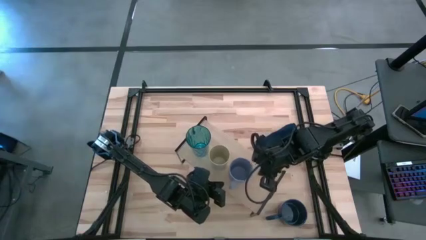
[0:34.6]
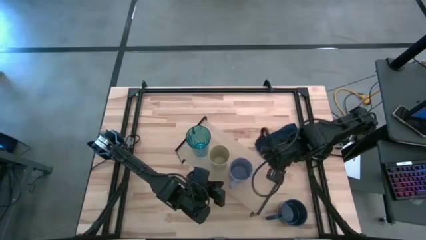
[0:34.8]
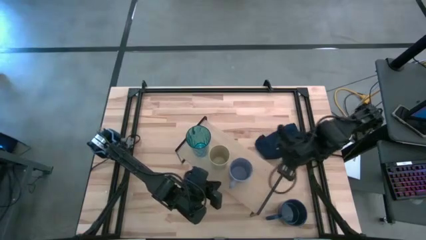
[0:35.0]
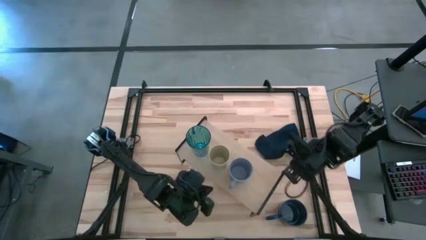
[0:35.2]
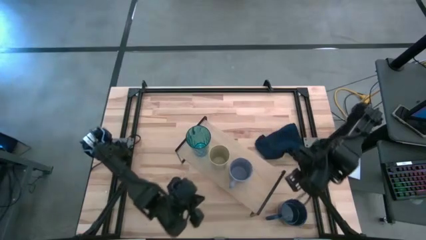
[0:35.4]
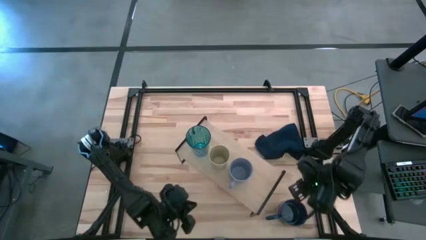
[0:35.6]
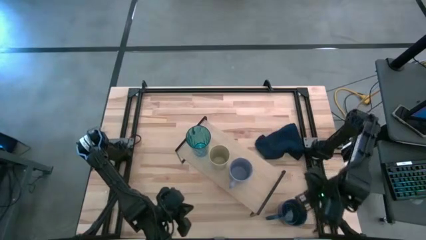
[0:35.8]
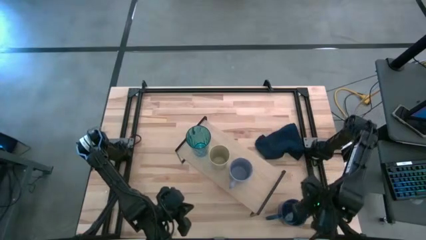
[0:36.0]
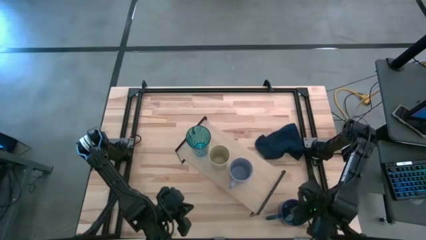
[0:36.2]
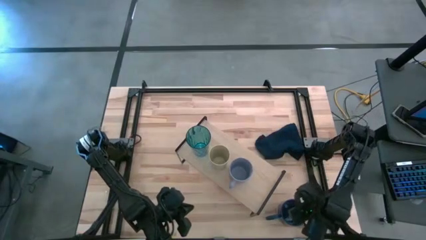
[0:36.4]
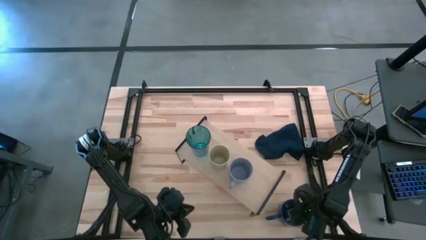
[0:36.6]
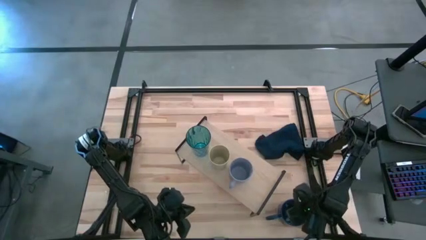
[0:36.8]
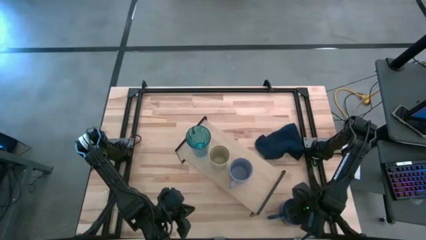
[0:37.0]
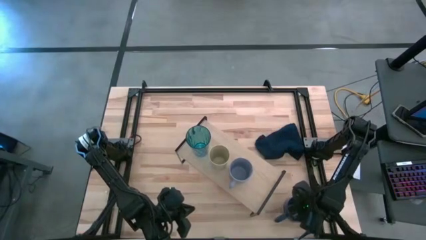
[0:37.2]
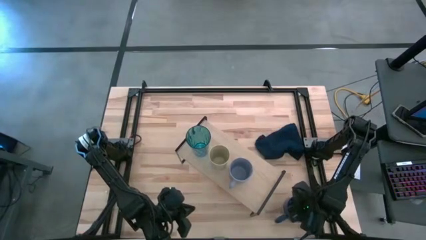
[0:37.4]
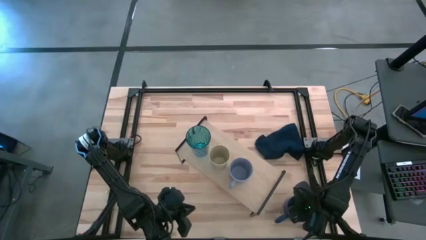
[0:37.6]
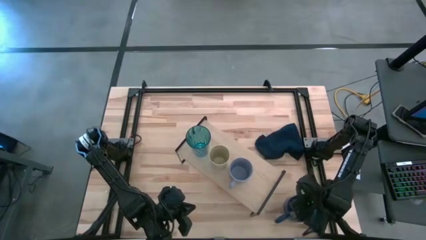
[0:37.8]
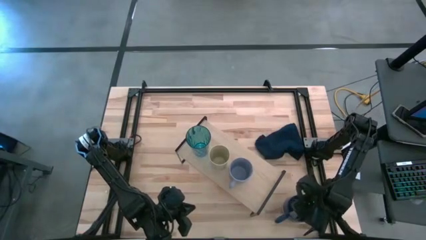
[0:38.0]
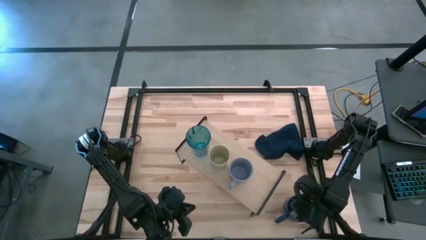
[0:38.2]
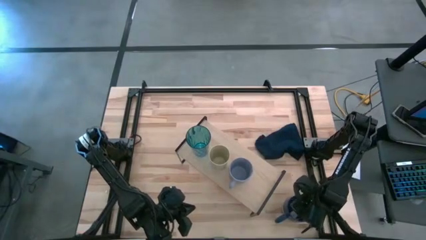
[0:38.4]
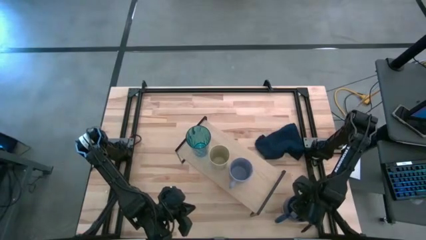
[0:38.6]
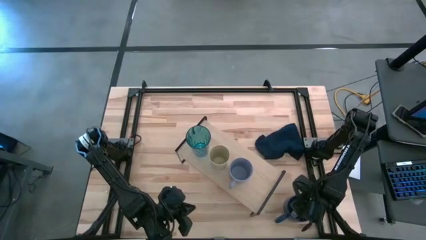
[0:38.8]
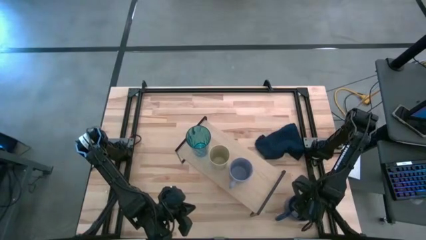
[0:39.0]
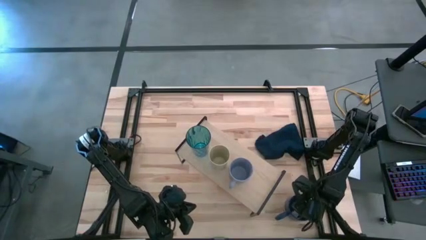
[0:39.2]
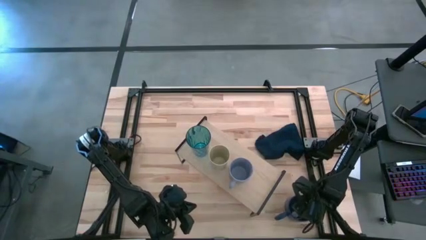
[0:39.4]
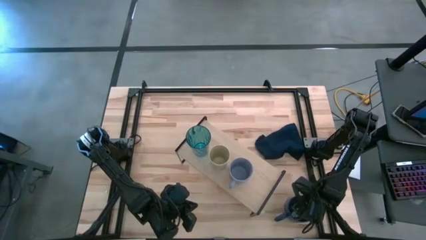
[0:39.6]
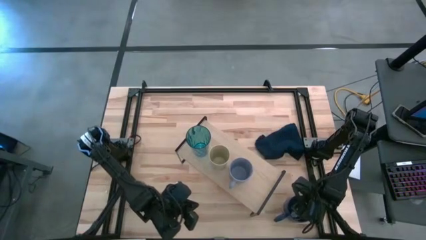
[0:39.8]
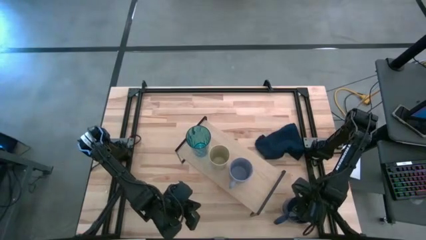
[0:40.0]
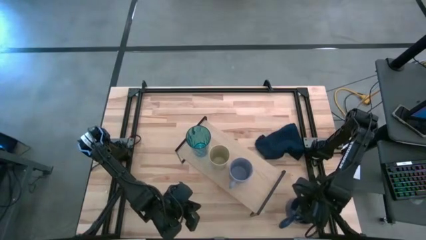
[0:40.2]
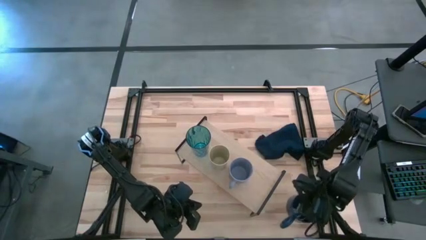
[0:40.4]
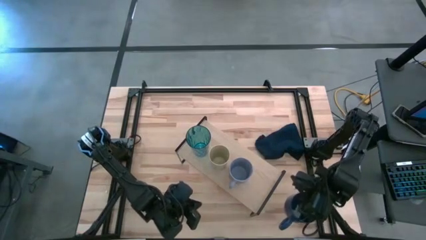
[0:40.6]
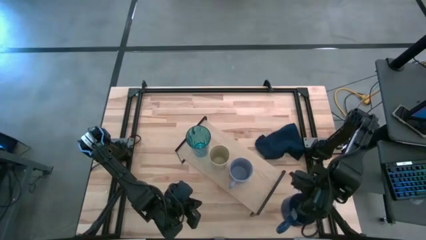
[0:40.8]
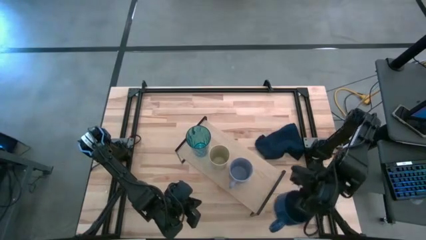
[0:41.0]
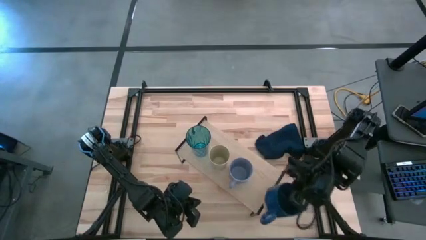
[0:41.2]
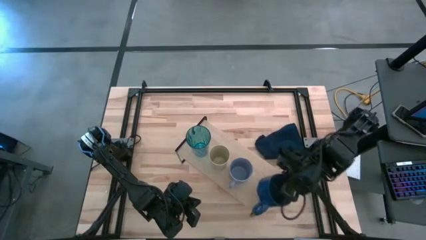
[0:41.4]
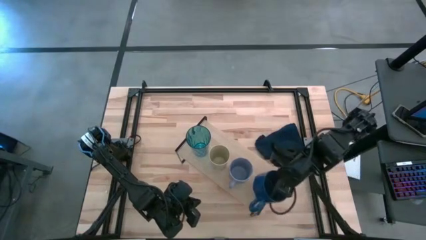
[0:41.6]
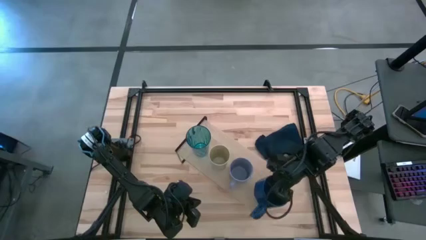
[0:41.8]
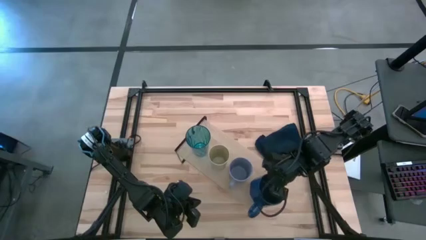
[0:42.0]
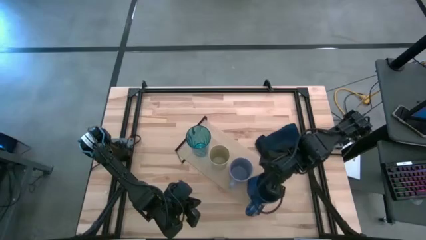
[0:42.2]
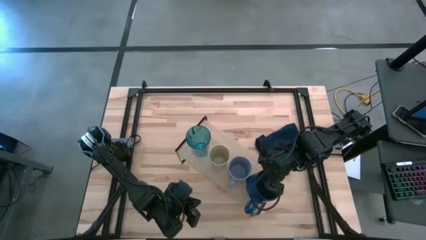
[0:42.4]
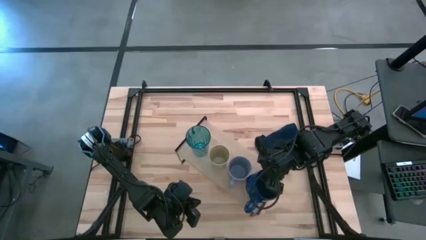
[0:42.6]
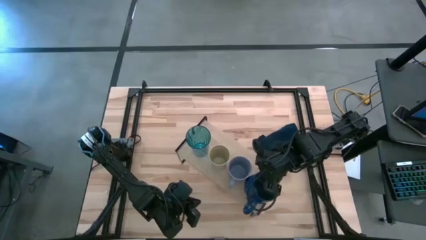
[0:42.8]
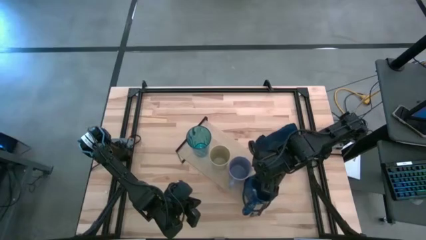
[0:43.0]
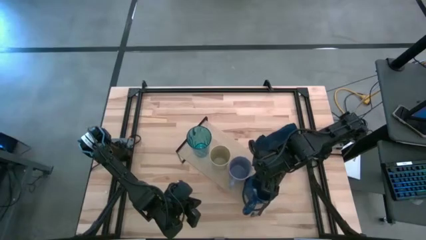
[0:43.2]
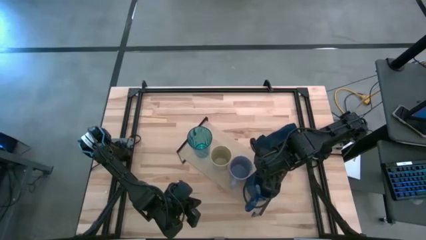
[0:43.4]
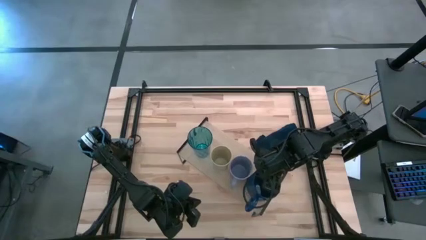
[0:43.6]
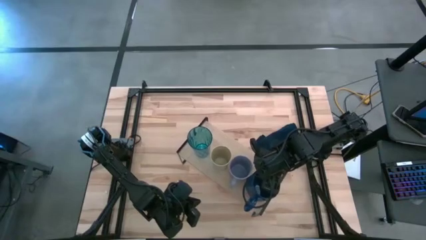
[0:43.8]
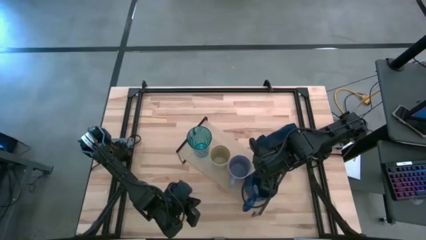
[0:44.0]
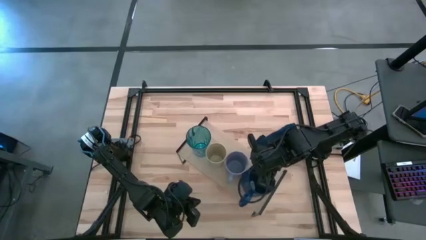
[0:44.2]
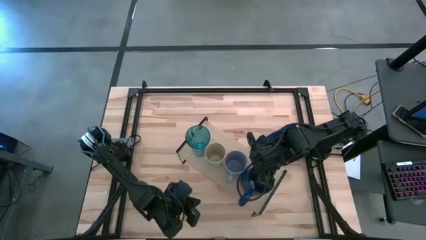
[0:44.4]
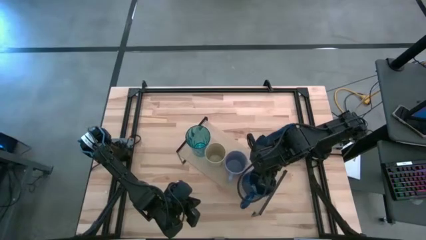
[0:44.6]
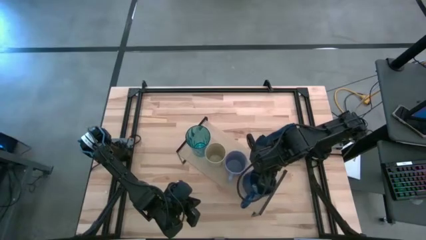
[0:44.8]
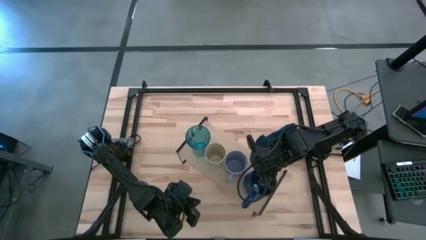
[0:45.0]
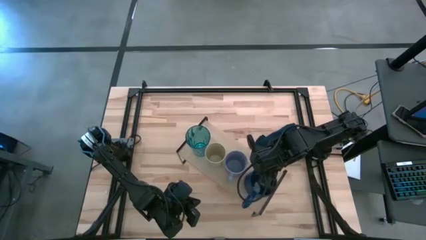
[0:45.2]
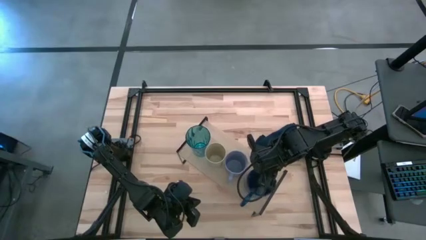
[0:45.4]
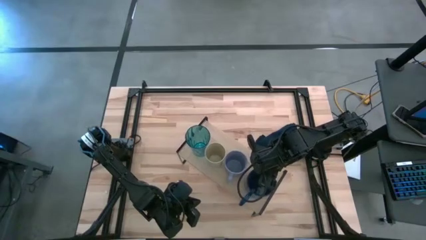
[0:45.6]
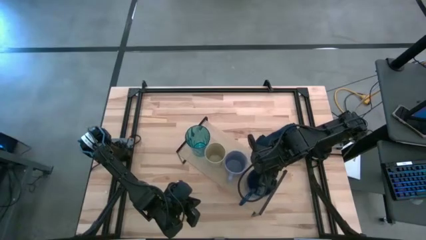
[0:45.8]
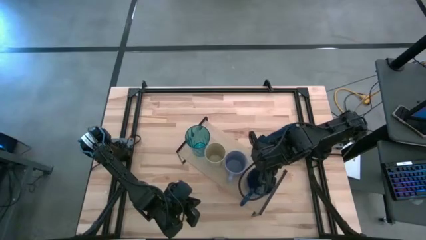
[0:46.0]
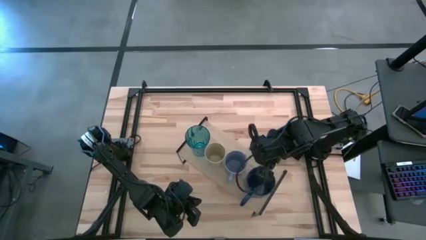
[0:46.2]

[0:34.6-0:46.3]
Task: Stack small to large cups/mugs on shelf
Put the dark blue mug on the shelf

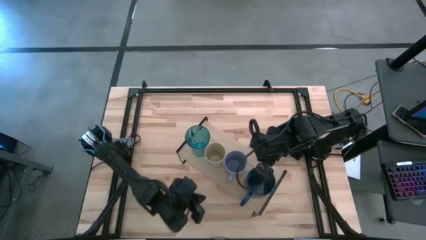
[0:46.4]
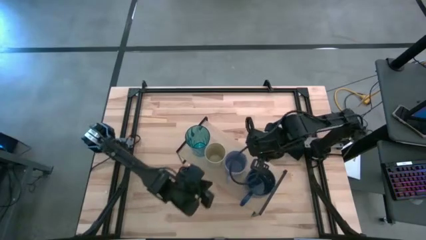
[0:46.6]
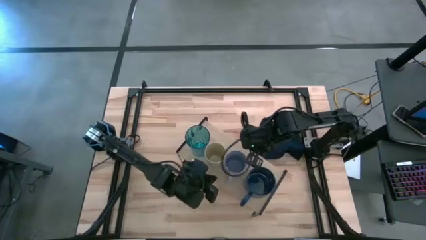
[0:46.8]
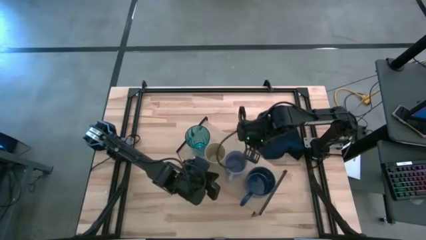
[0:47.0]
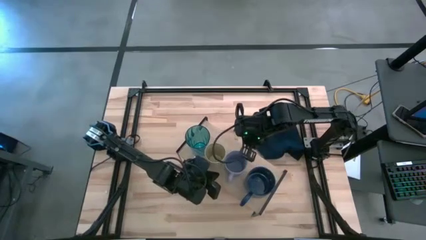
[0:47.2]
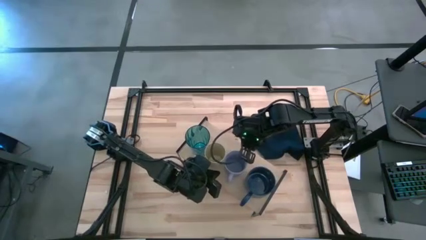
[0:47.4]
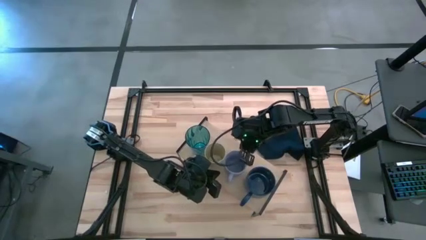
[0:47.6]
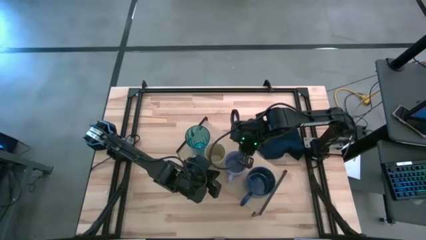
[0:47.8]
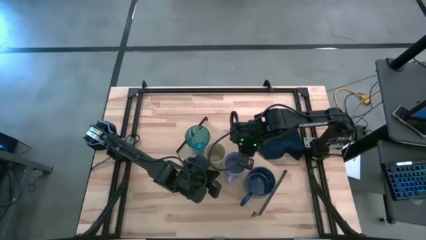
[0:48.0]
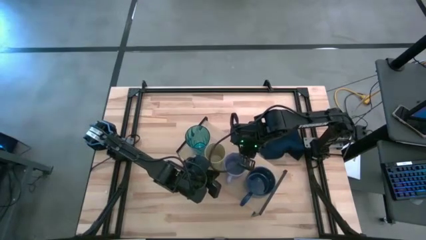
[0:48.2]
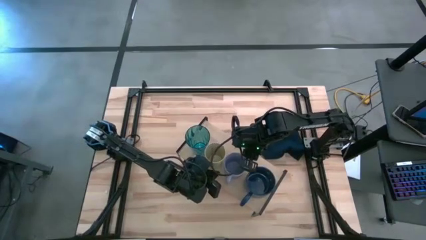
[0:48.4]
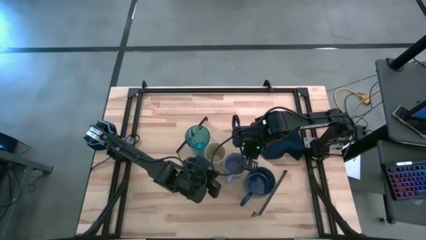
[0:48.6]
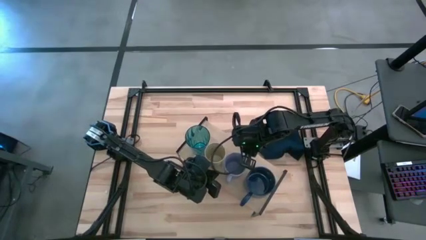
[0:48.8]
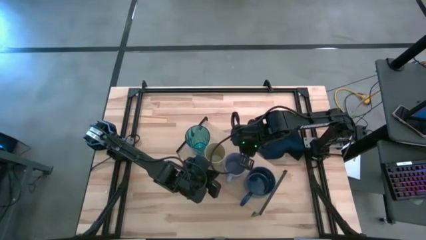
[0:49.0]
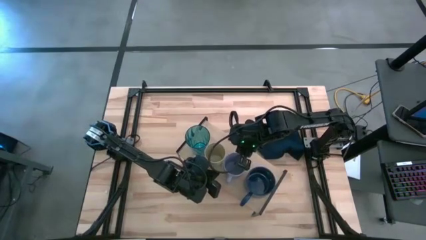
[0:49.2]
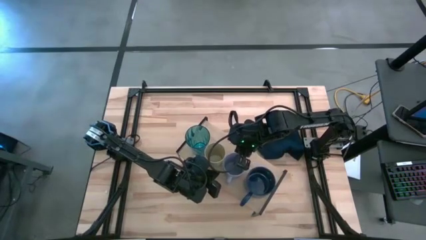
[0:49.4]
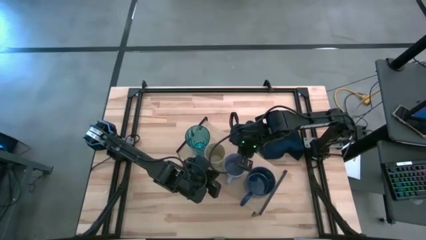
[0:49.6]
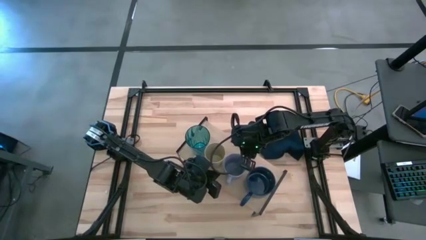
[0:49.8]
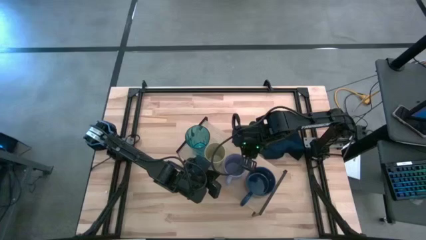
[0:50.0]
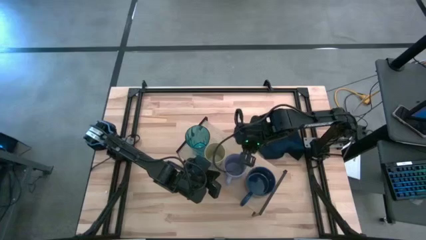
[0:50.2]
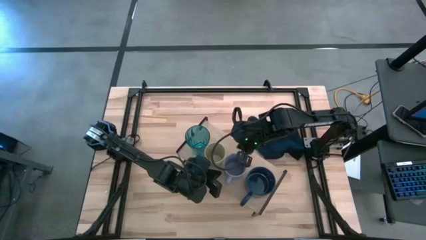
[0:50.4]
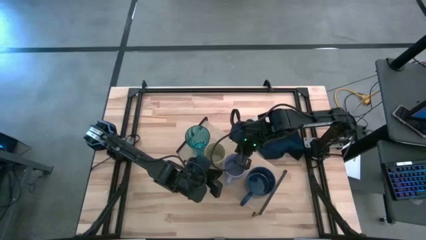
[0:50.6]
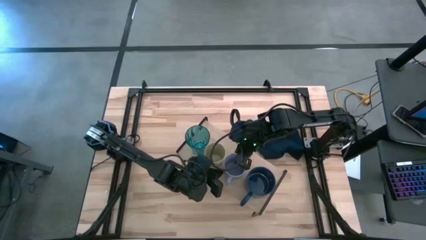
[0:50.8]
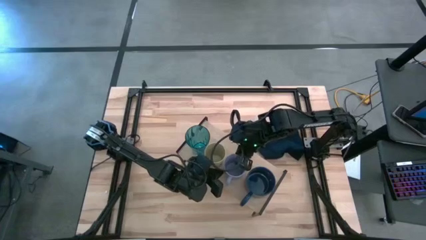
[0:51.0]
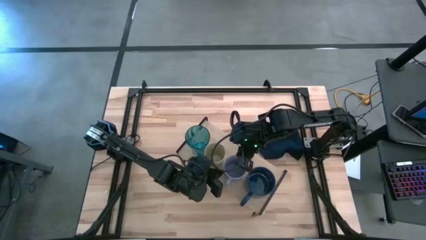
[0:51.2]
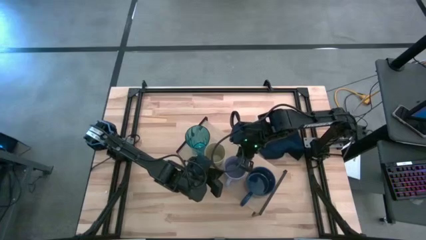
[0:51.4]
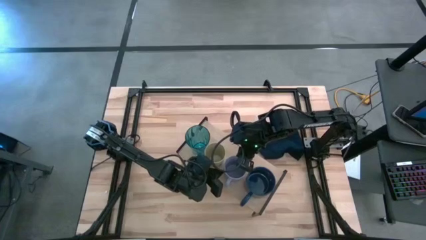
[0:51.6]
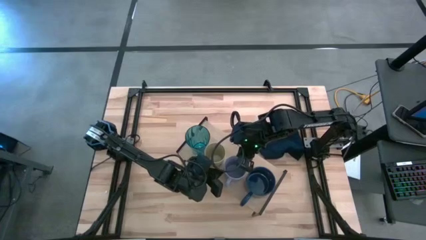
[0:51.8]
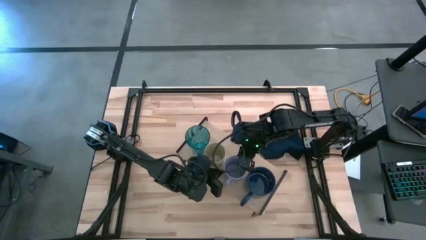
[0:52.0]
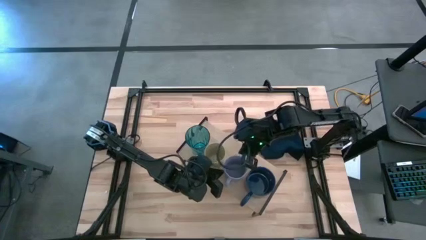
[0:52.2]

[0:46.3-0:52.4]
Adjust the light purple mug on the shelf
